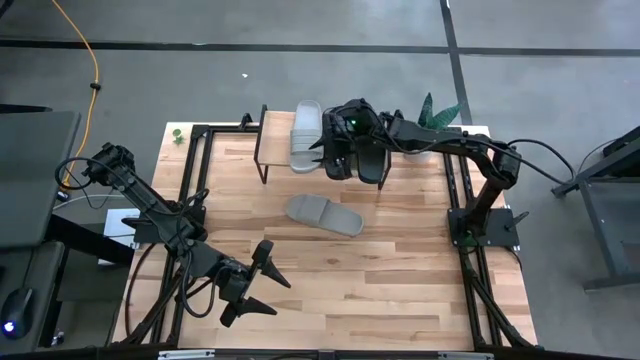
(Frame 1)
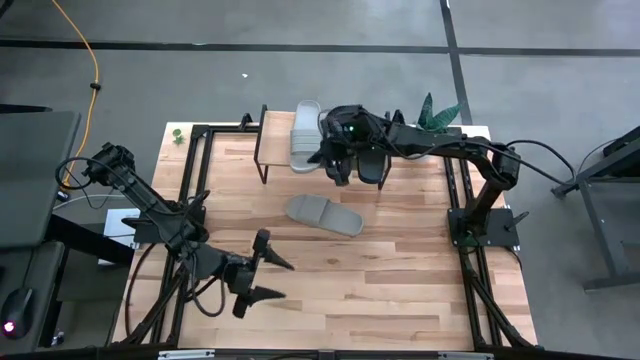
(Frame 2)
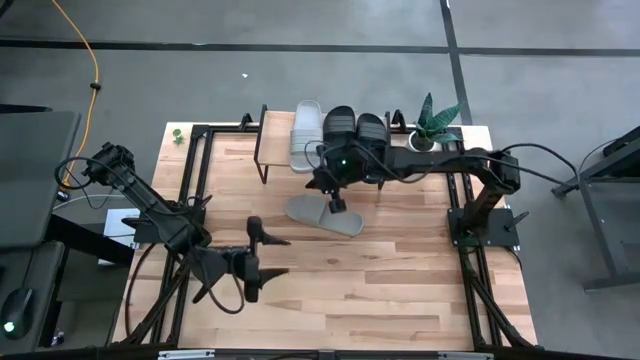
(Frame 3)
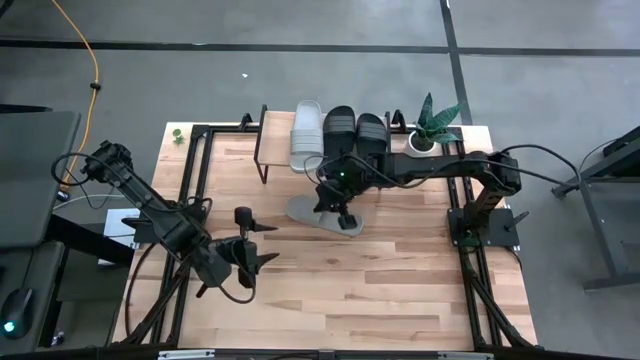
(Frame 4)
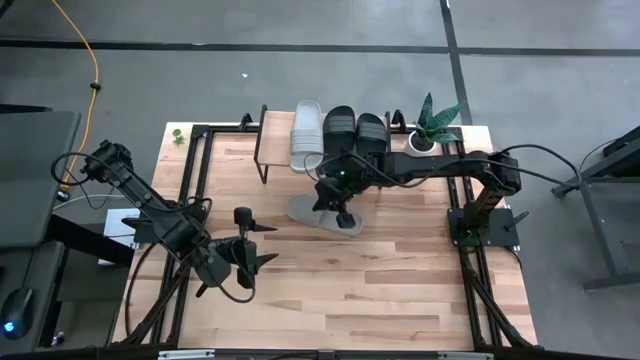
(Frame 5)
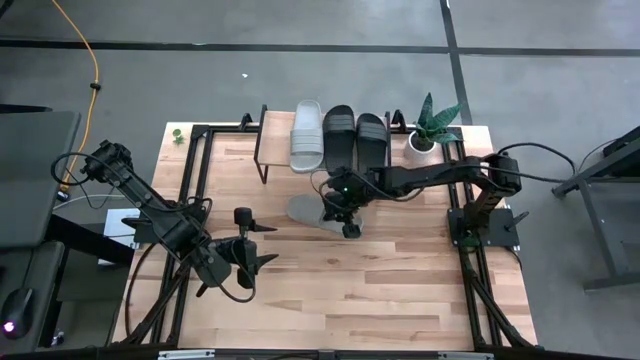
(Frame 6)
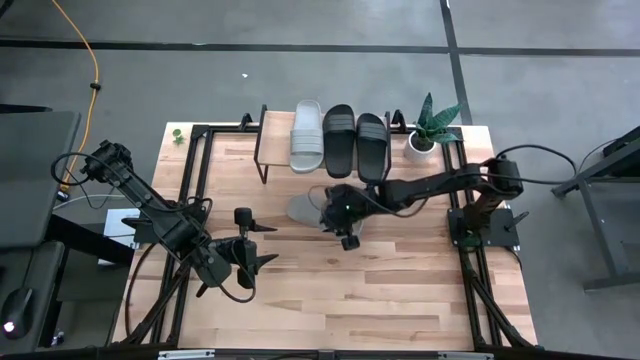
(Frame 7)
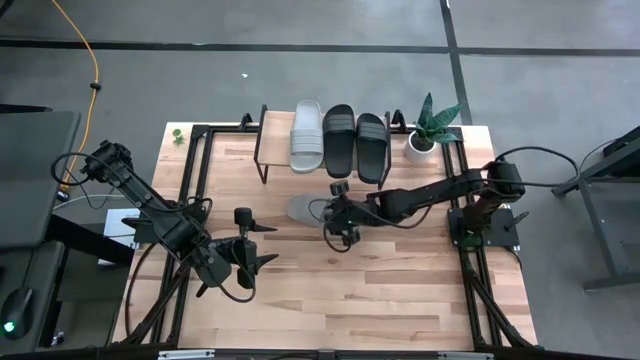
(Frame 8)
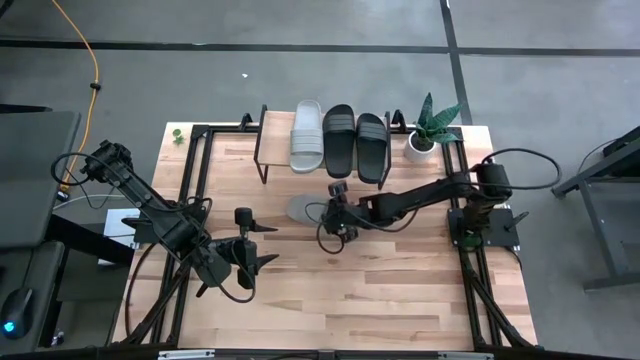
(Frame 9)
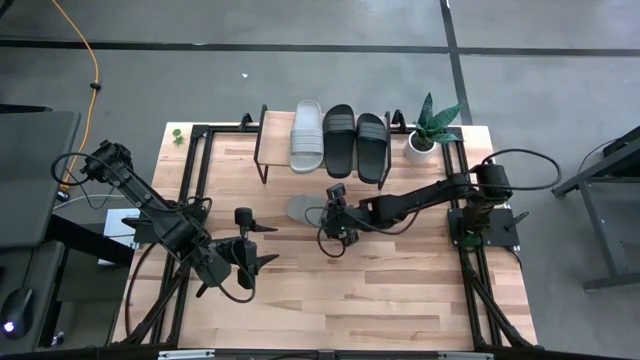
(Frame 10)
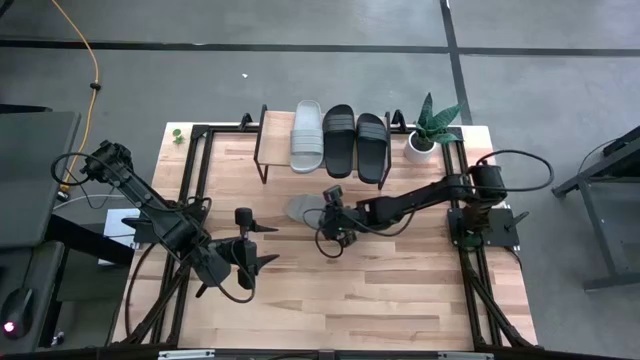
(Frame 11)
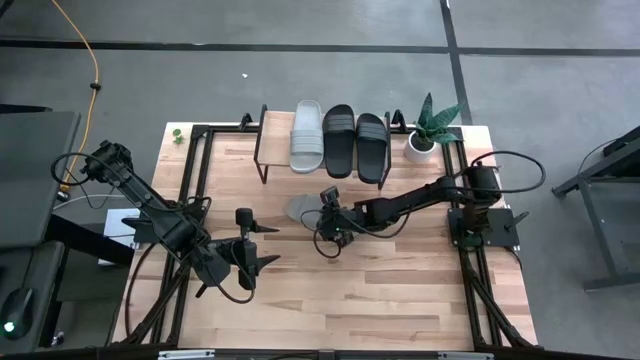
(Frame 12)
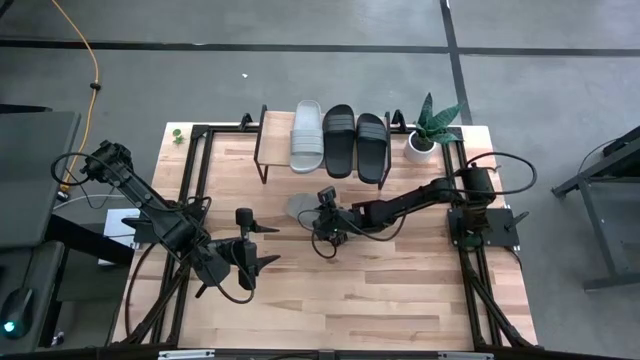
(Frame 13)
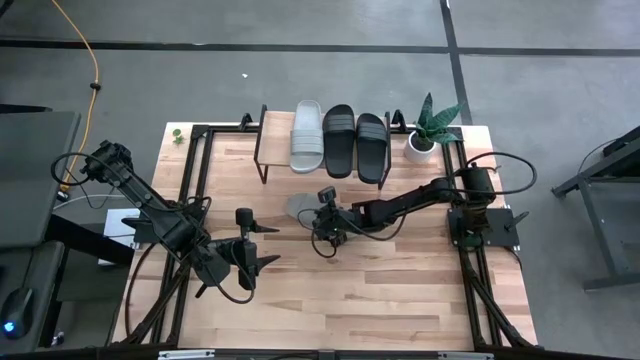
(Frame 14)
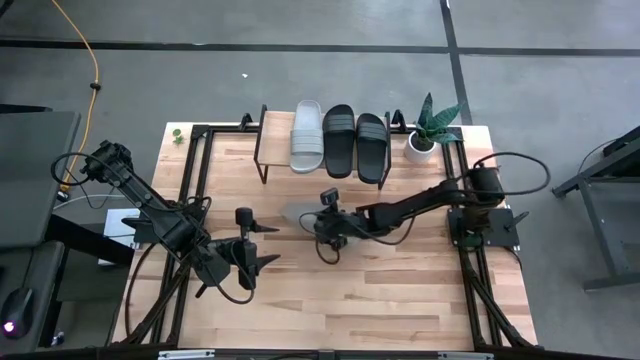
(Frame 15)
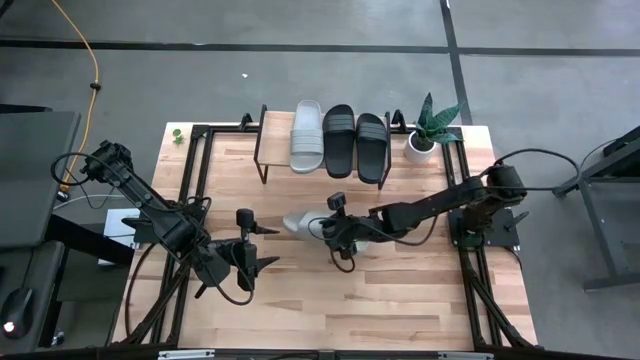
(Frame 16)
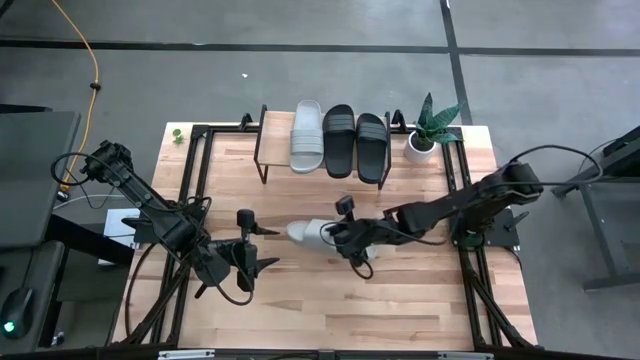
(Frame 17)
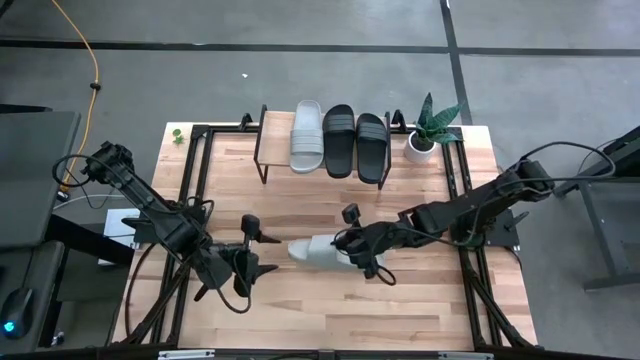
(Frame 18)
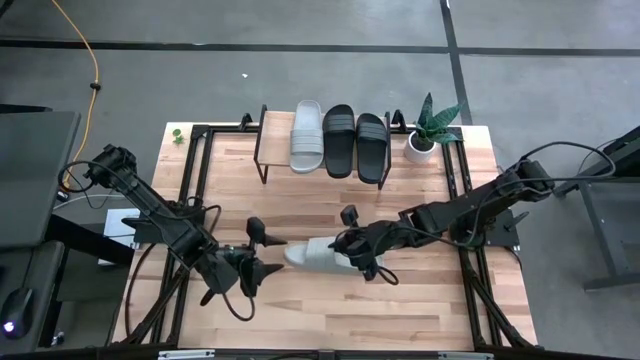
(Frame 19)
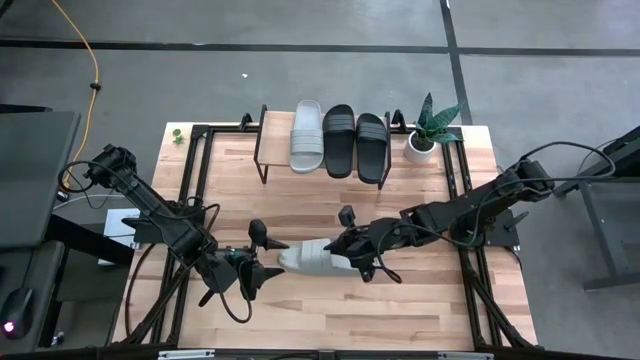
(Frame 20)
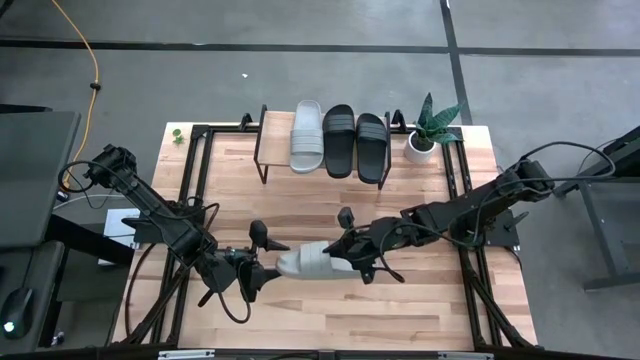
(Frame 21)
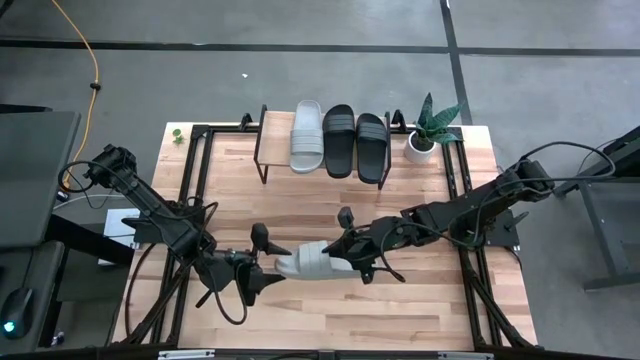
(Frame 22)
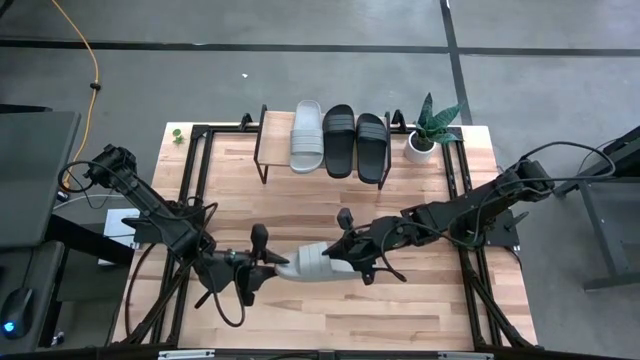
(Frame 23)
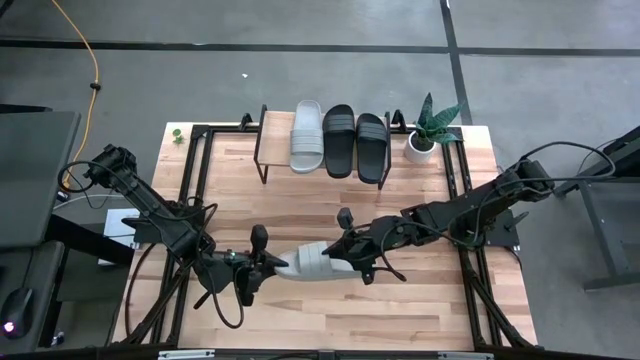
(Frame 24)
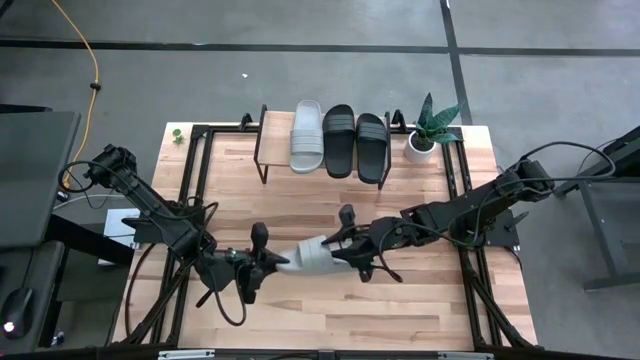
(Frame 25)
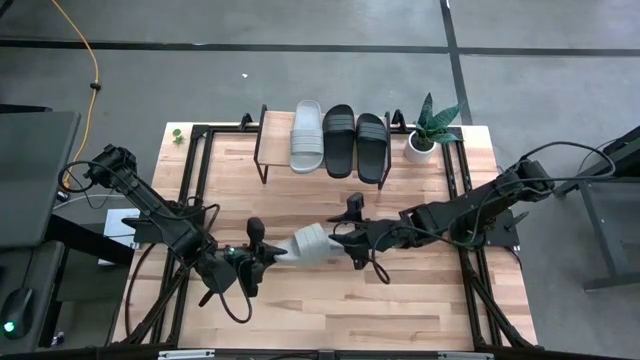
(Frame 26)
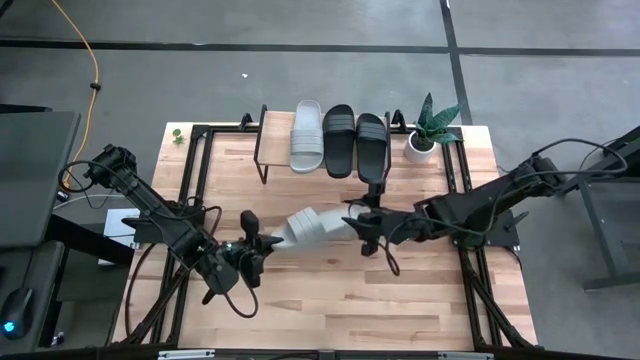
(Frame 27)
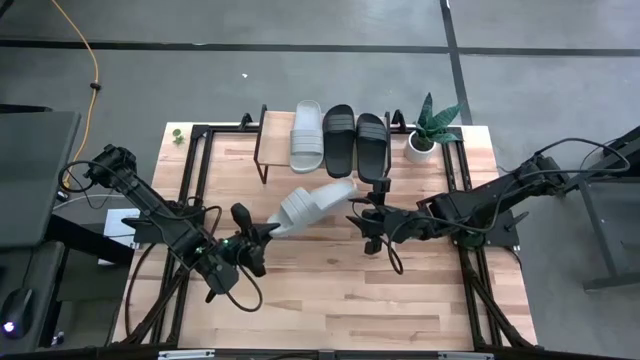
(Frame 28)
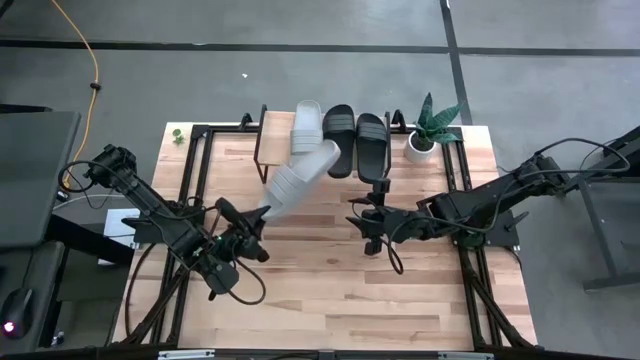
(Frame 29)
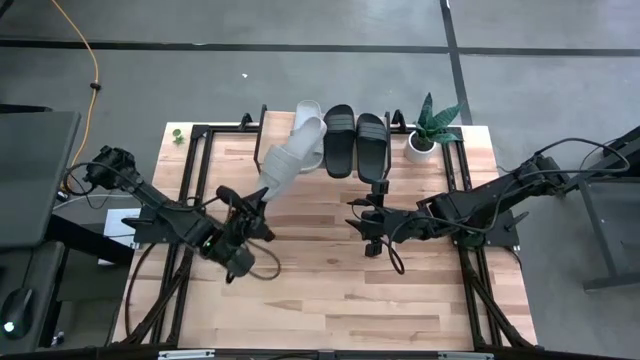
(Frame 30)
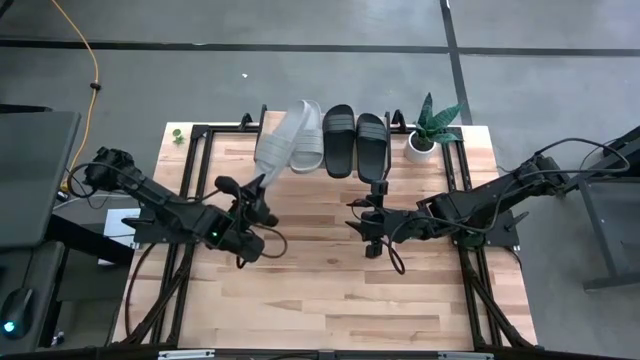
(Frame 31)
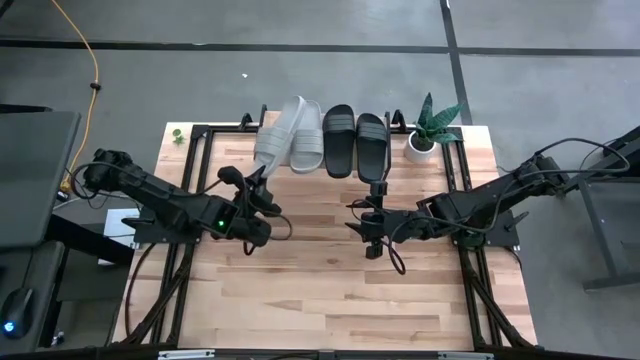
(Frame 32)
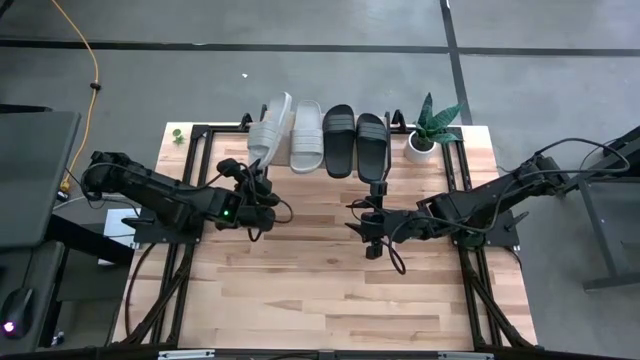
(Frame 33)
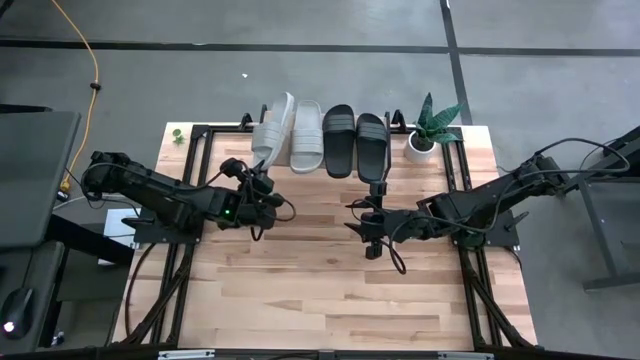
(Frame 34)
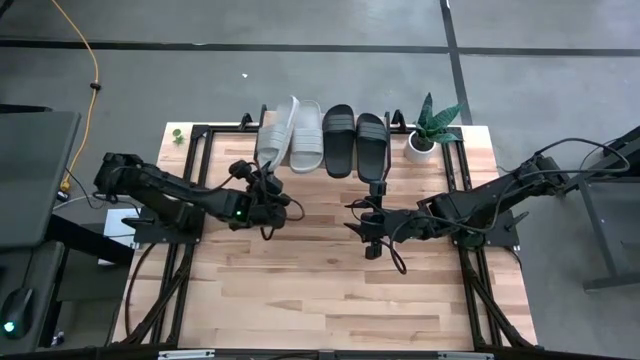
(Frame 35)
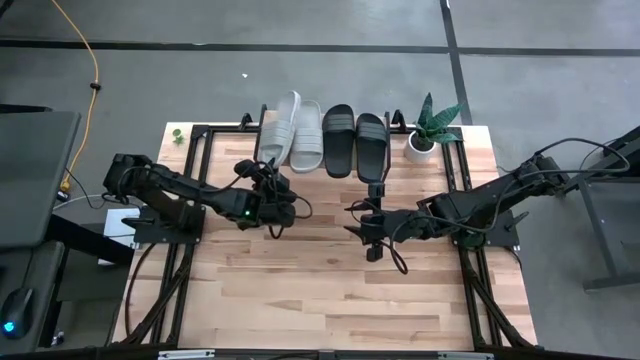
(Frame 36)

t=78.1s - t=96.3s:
Task: Pick and place slides into the shelf
Put the white slide on the shelf

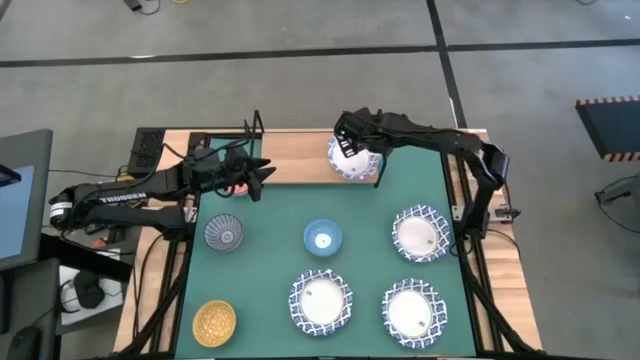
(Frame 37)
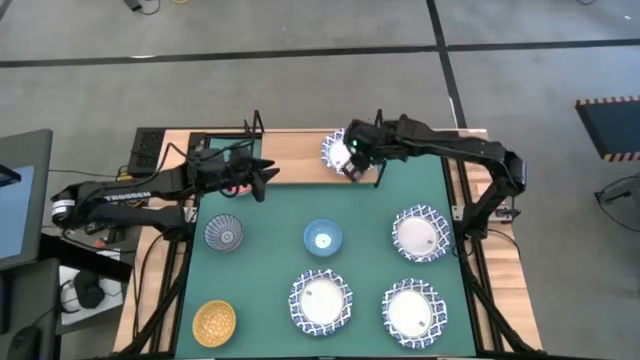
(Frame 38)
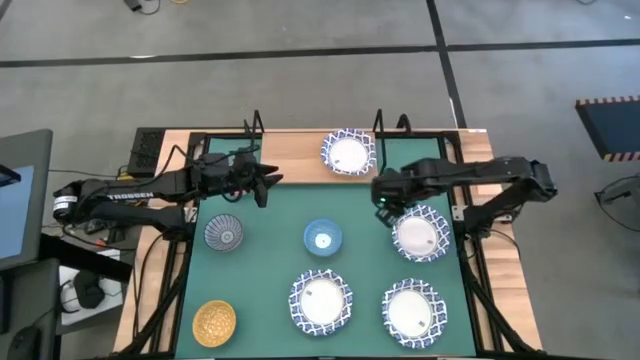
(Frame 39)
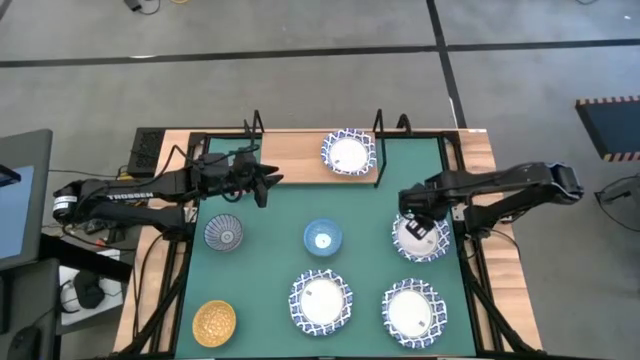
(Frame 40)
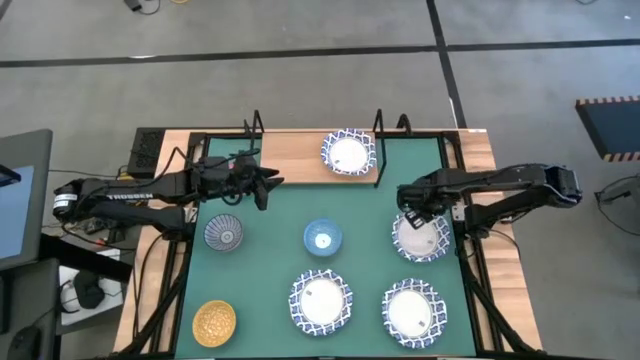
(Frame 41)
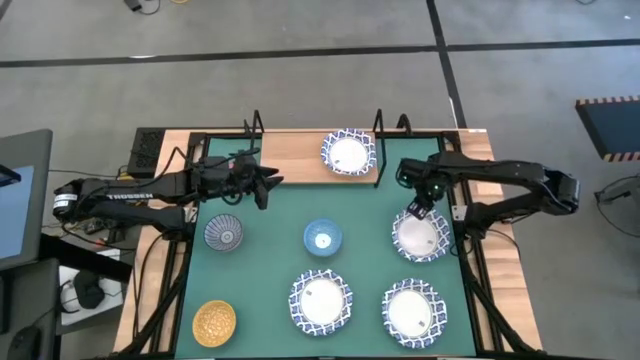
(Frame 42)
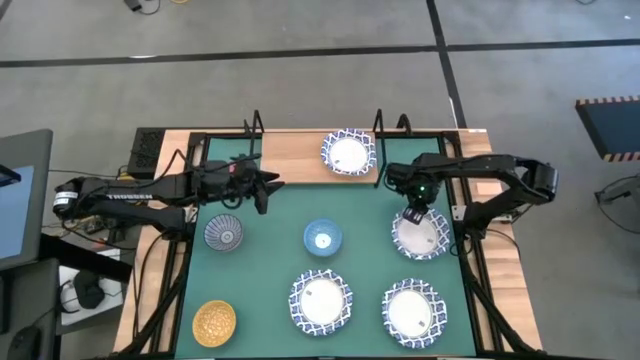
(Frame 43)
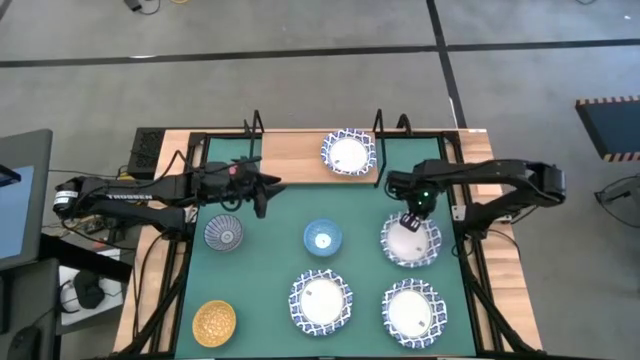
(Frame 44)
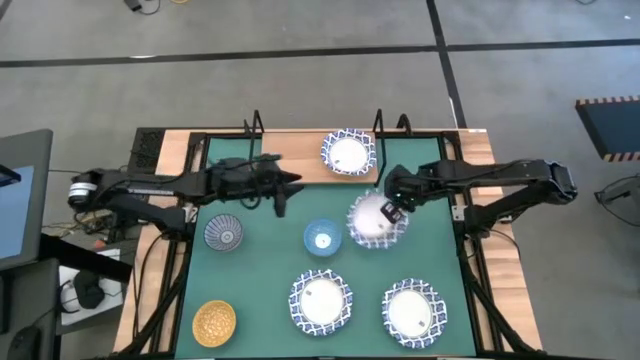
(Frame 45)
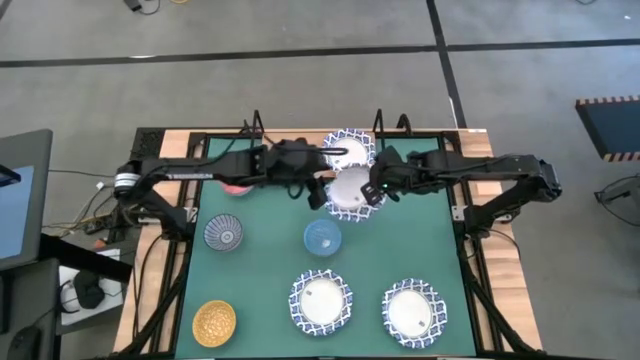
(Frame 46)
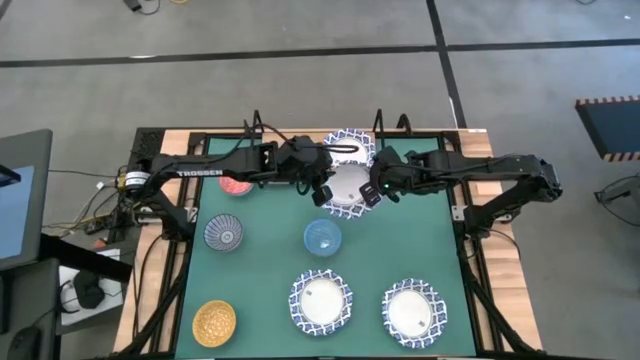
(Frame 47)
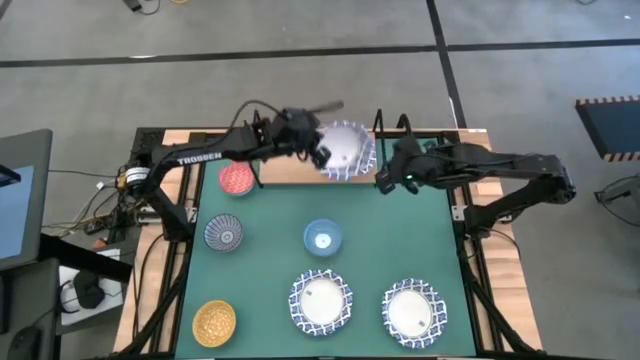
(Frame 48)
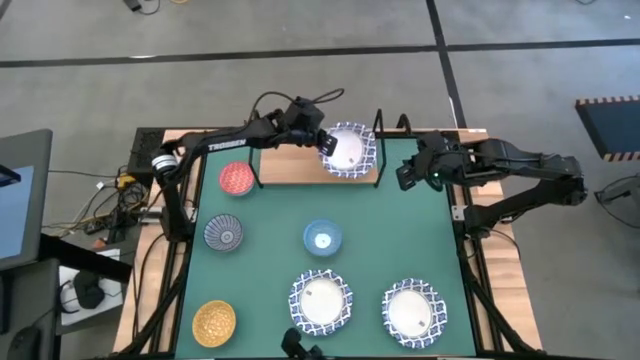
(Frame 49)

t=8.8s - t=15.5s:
Task: Place and stack bowls onto a shelf
Stack the top white patterned bowl on top of the other white patterned bowl on the shelf
